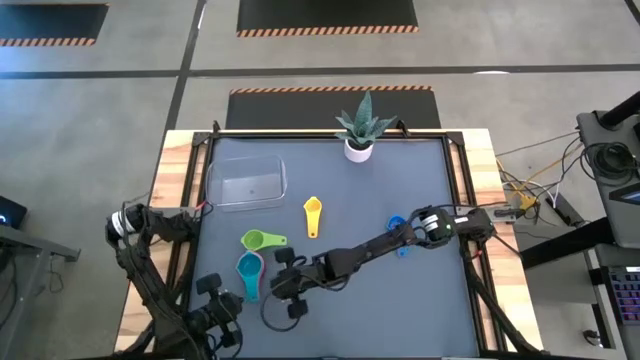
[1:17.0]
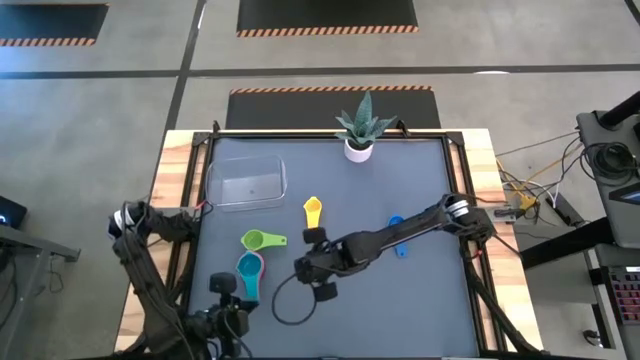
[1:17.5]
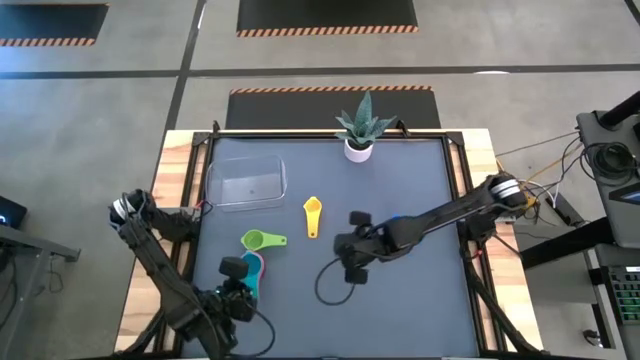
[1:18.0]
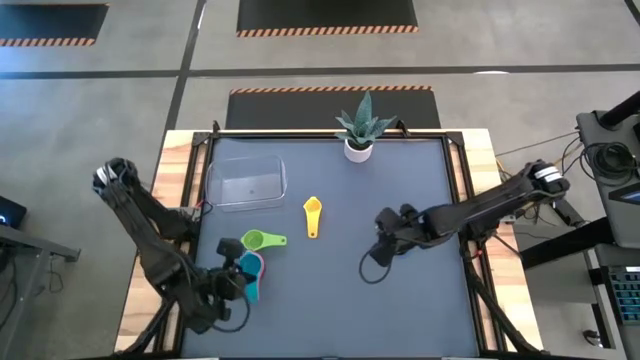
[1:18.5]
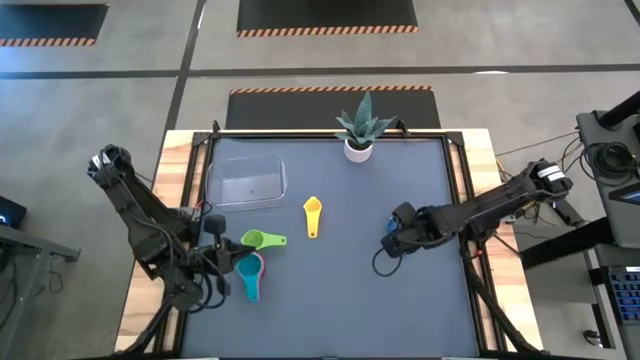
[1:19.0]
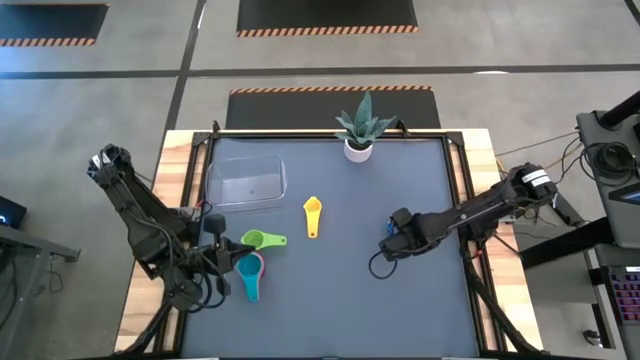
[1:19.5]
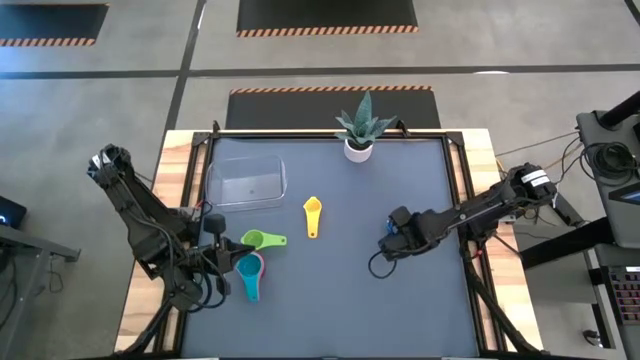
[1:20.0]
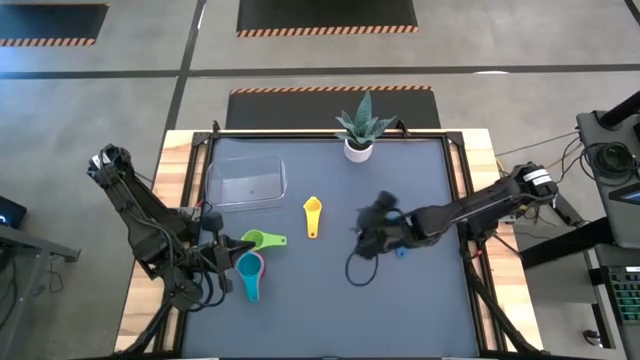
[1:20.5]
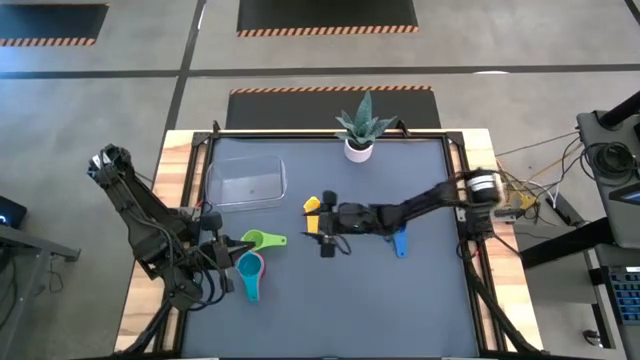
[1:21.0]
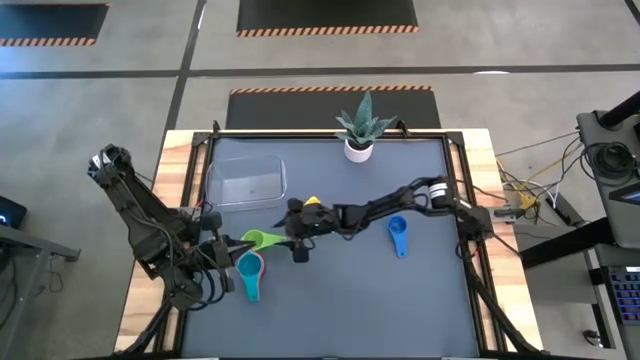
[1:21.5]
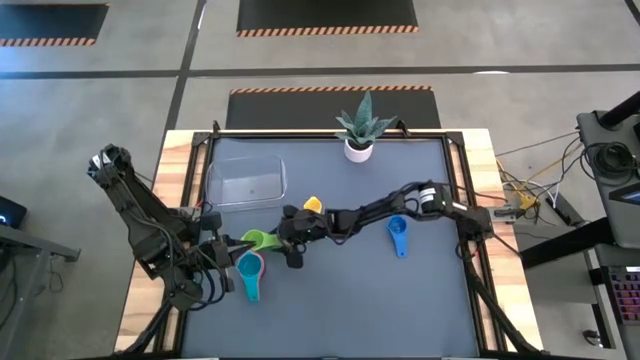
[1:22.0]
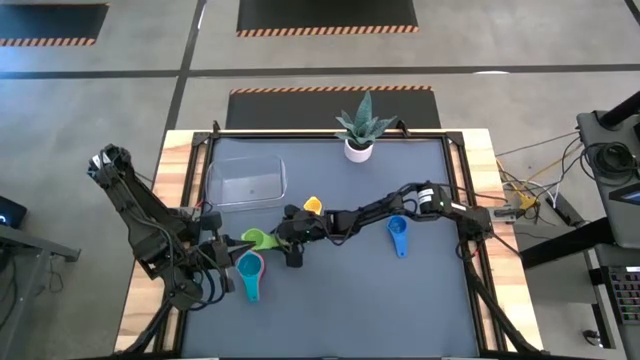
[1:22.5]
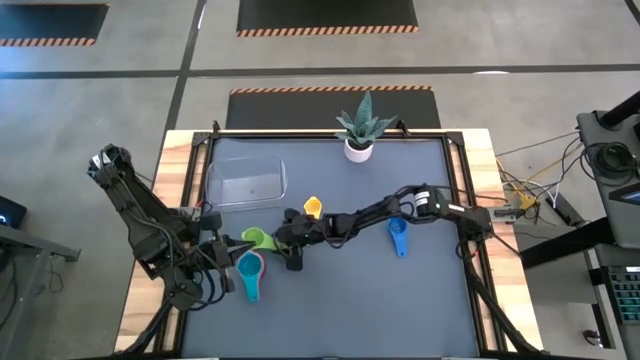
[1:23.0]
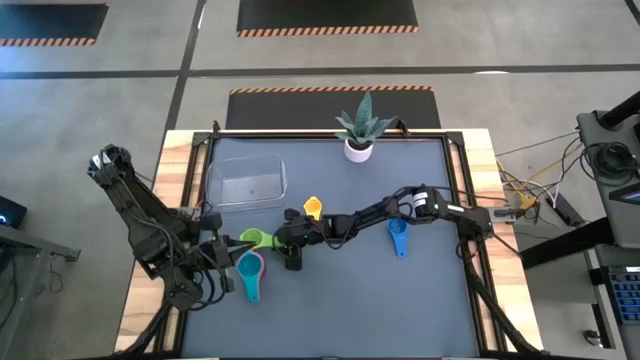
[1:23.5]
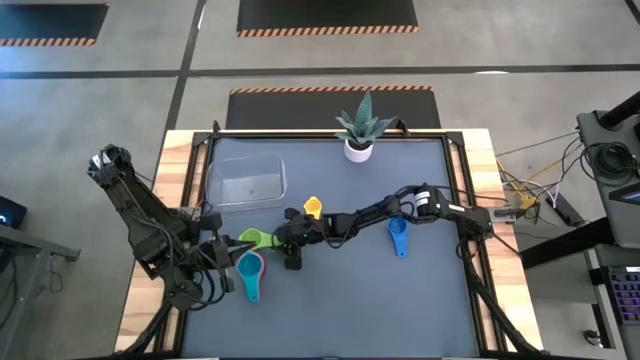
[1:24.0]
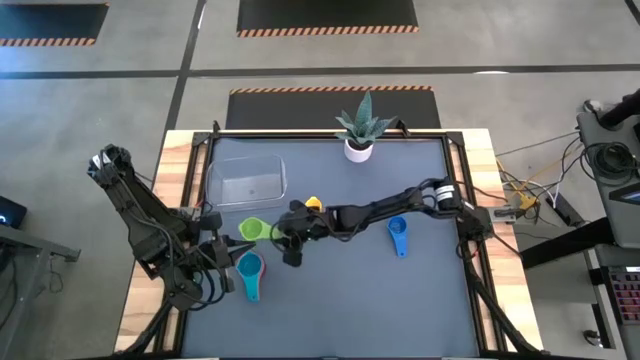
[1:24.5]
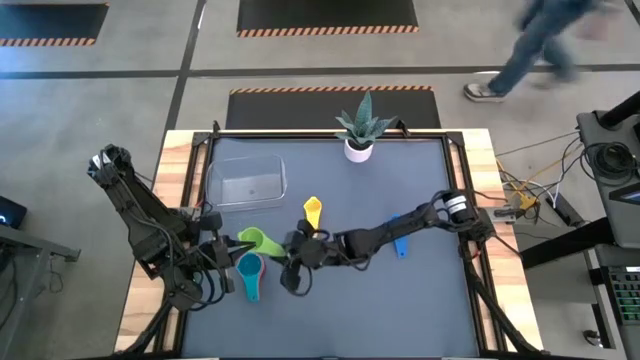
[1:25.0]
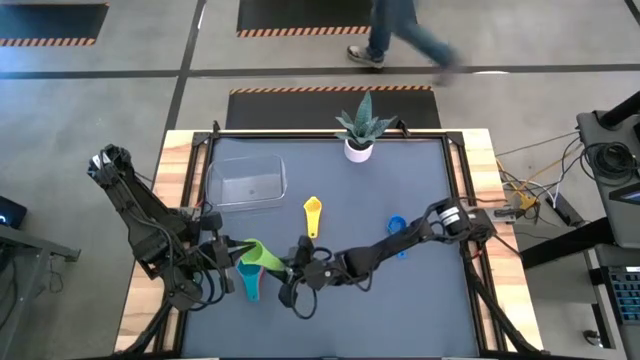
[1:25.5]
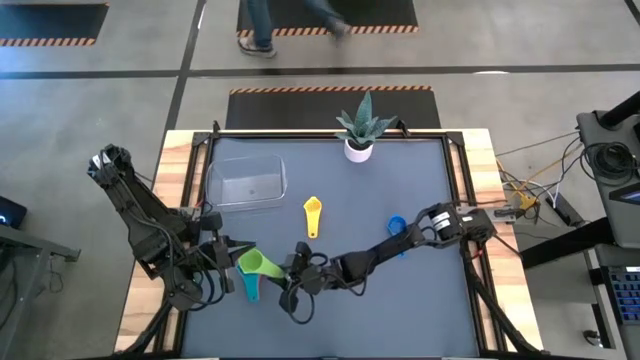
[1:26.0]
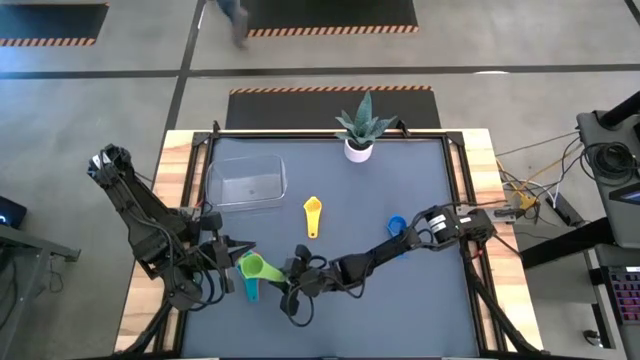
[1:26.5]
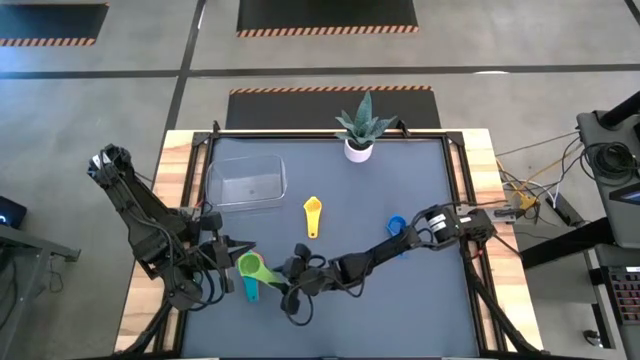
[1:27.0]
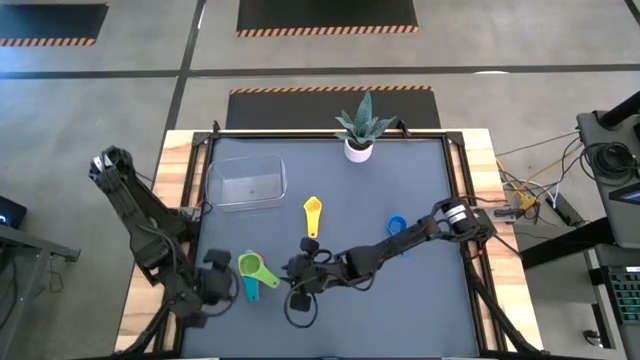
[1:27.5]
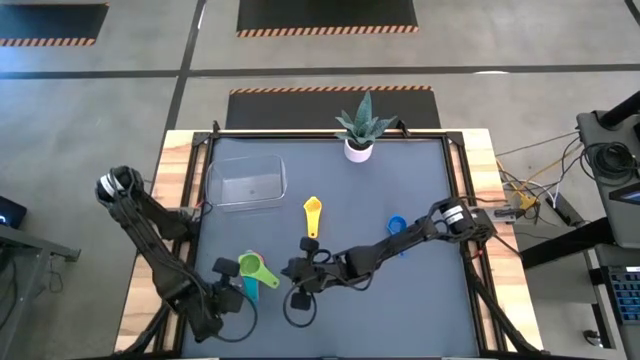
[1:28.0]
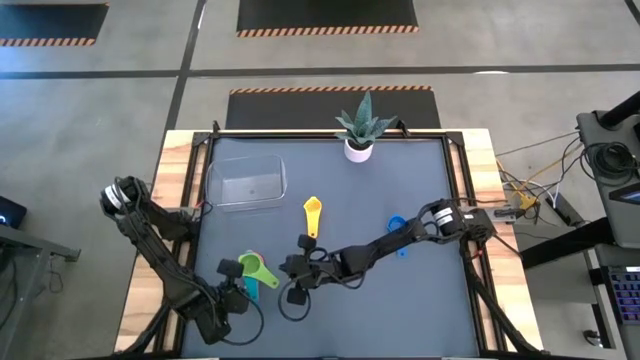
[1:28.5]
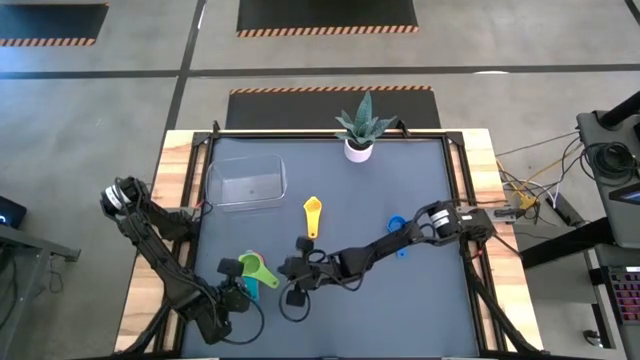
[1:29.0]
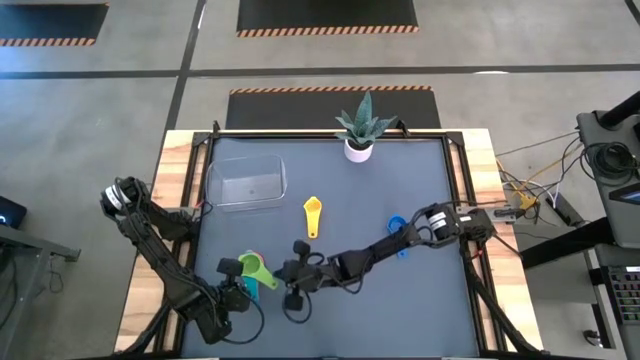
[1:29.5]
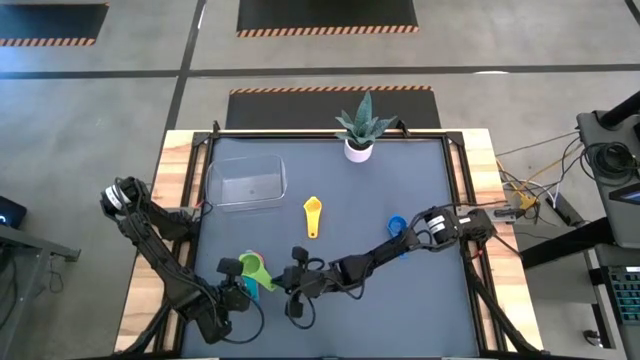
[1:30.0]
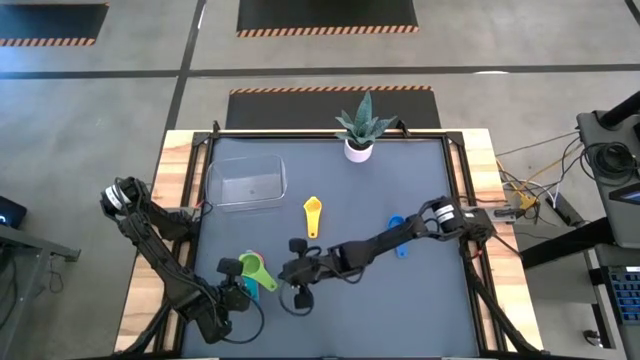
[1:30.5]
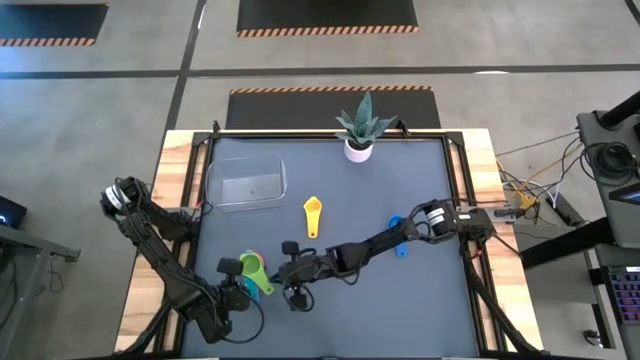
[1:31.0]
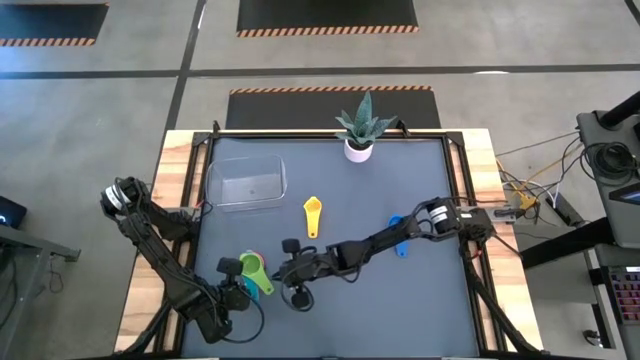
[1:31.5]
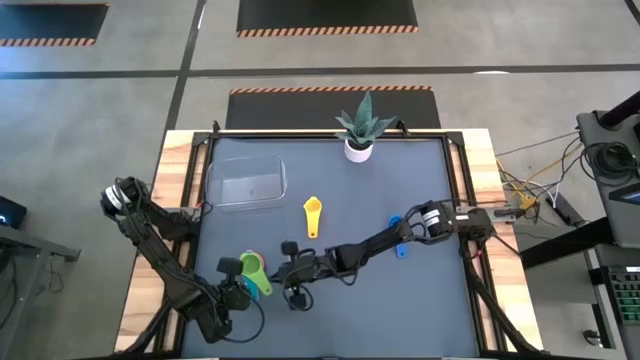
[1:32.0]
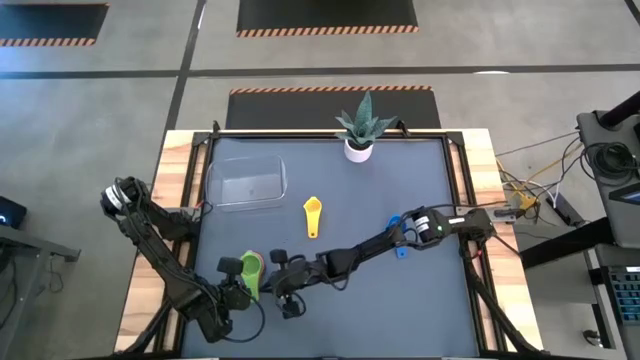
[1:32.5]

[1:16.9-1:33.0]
Task: Nest measuring cups in basket
Stack the green measuring cup on top of the light blue measuring cup

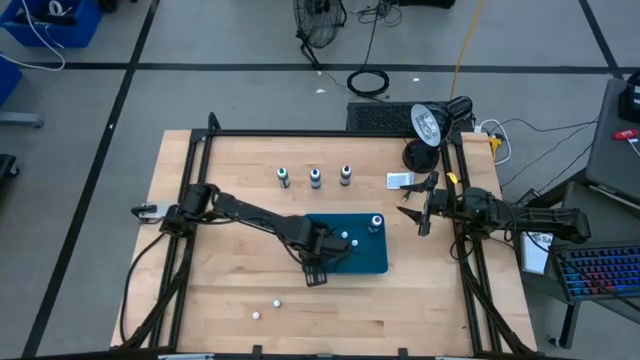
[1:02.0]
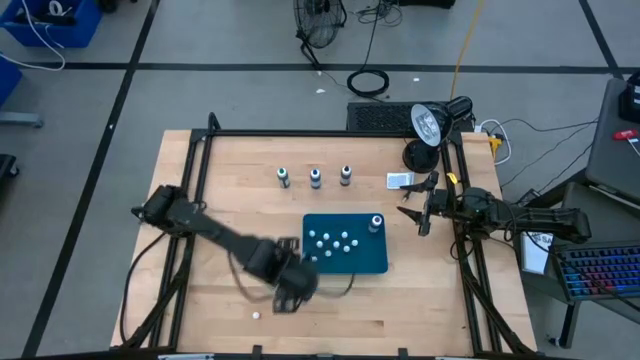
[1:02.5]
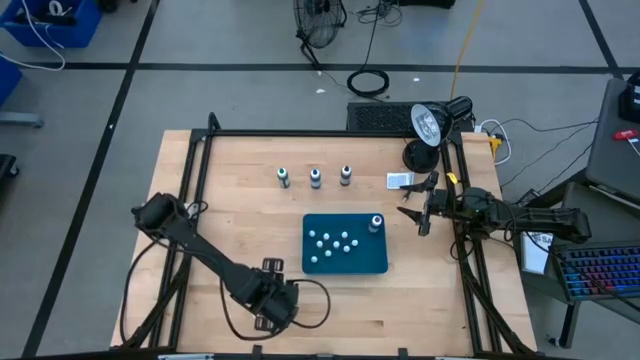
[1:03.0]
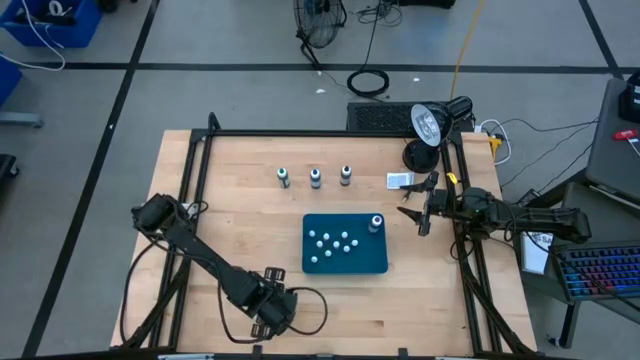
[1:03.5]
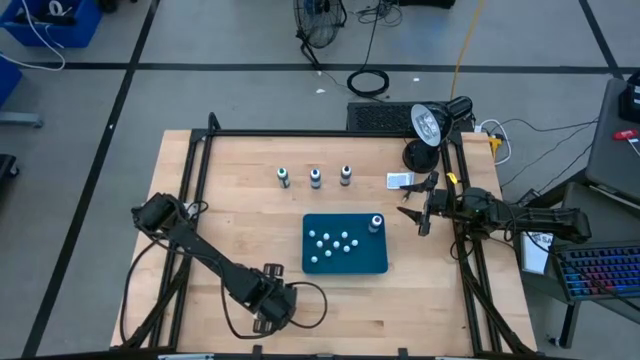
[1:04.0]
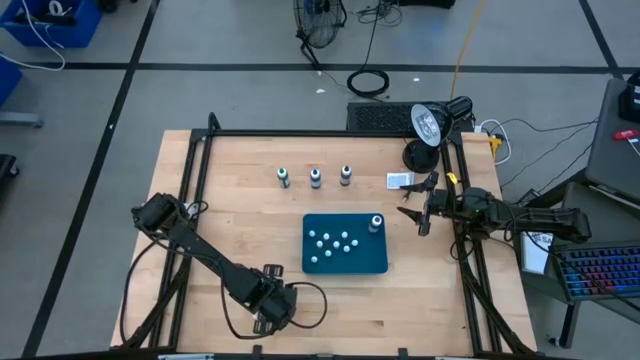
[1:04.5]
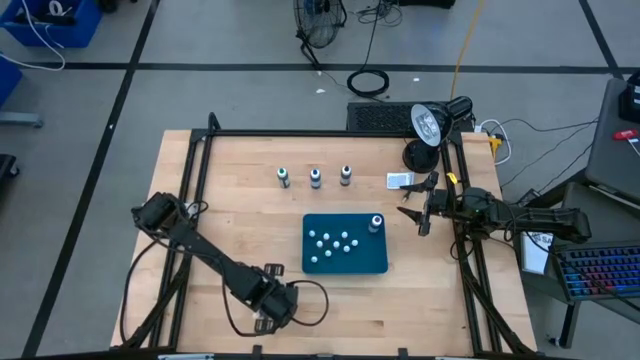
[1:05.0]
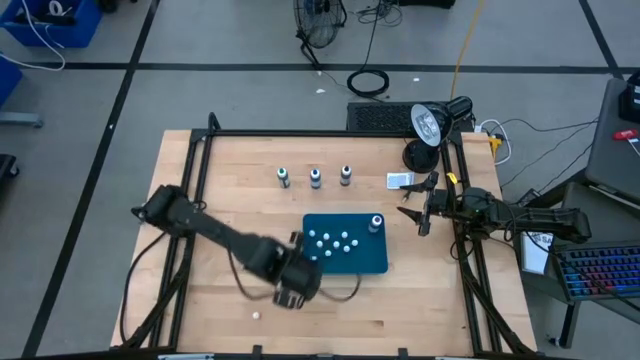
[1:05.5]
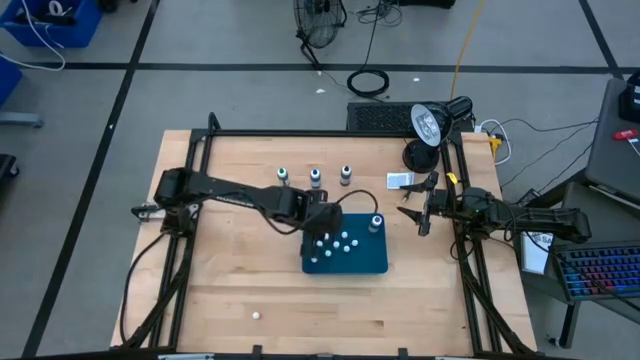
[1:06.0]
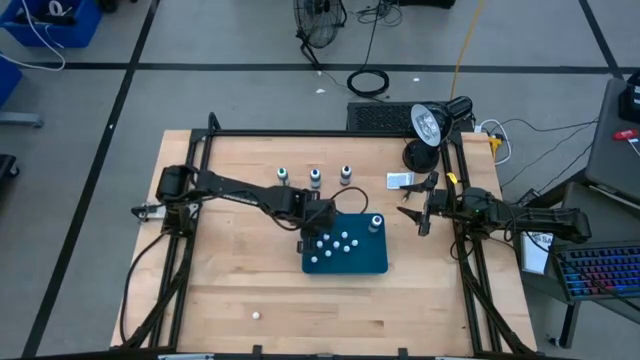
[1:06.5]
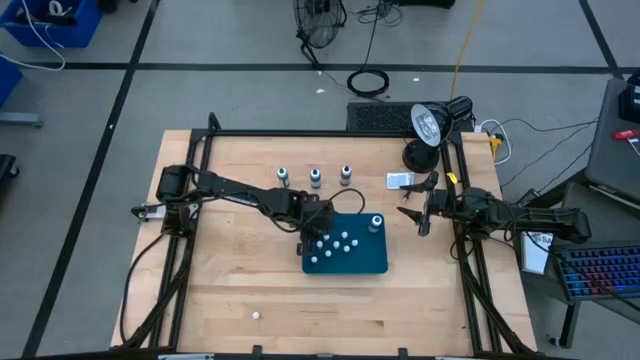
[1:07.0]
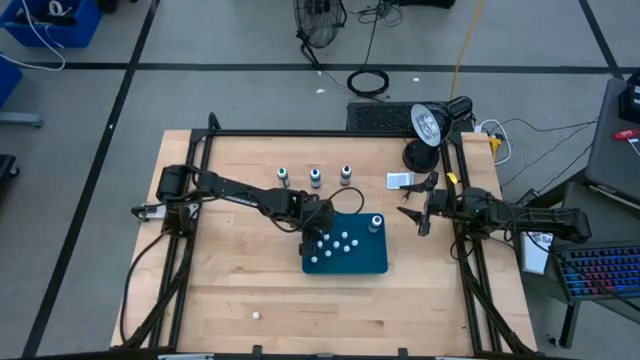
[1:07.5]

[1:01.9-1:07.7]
Task: Pick & Place food coloring
Put the small red food coloring bottle into the blue bin
